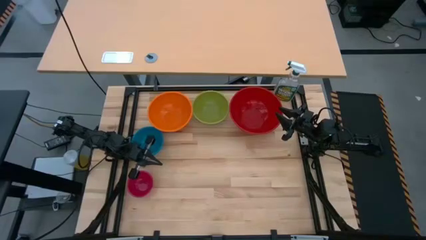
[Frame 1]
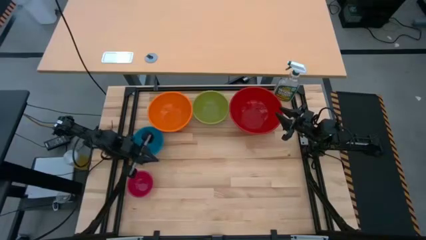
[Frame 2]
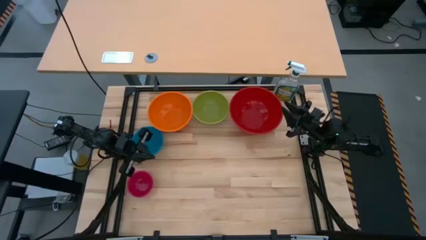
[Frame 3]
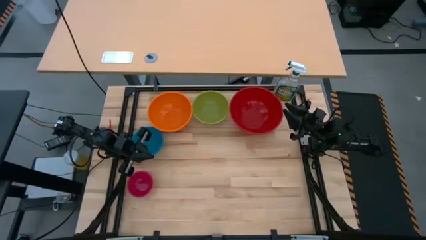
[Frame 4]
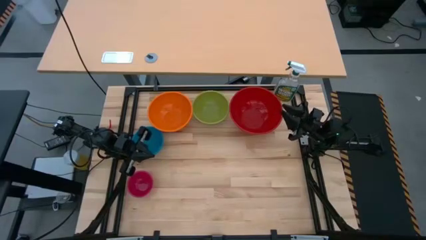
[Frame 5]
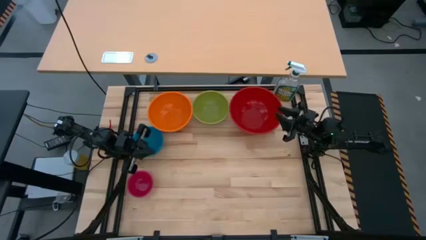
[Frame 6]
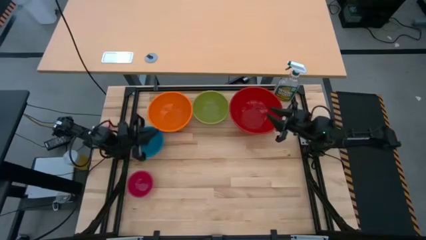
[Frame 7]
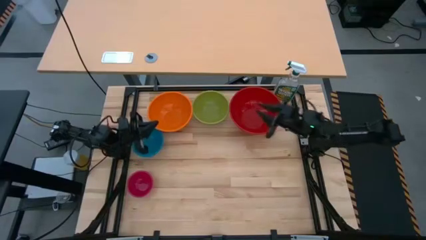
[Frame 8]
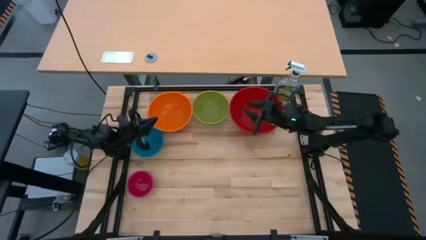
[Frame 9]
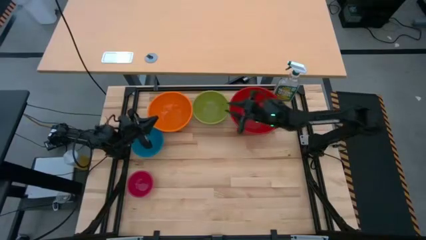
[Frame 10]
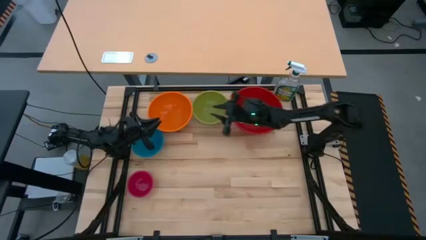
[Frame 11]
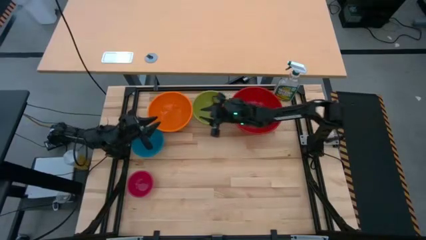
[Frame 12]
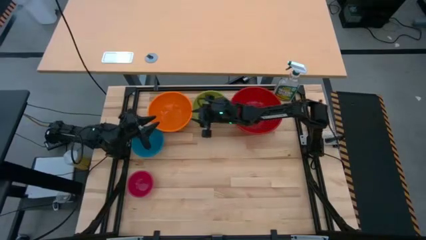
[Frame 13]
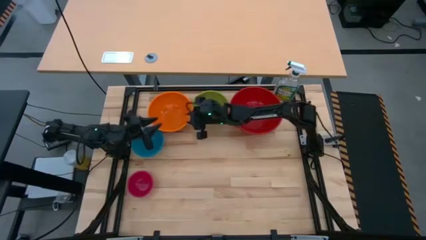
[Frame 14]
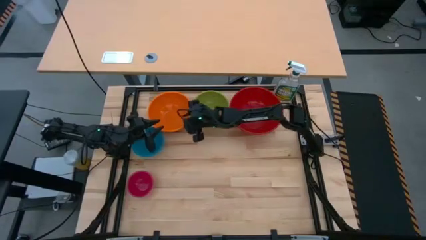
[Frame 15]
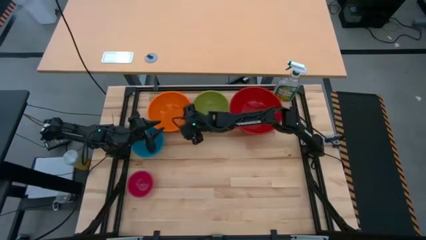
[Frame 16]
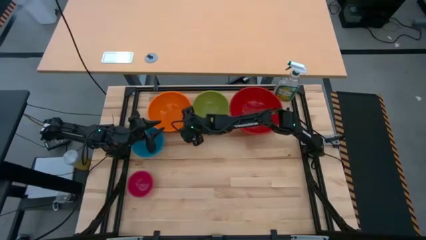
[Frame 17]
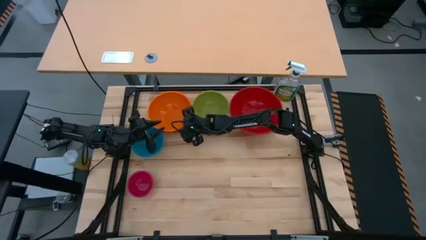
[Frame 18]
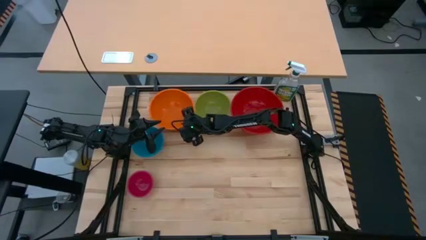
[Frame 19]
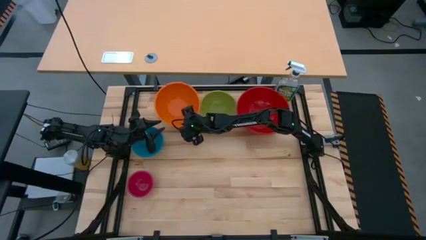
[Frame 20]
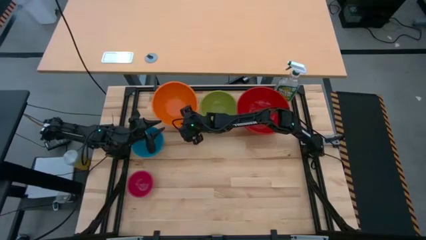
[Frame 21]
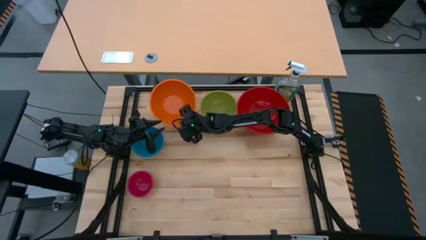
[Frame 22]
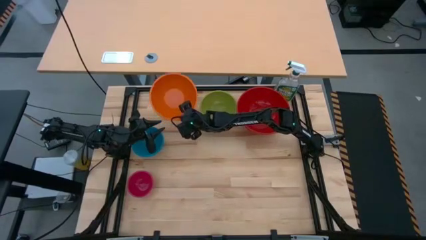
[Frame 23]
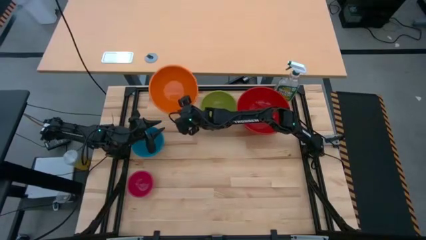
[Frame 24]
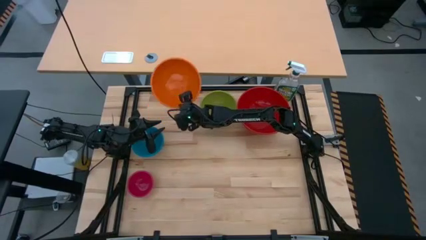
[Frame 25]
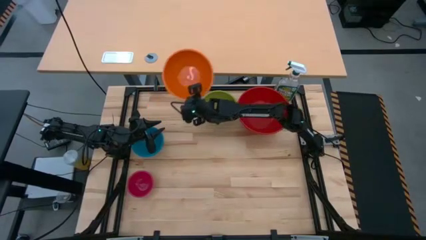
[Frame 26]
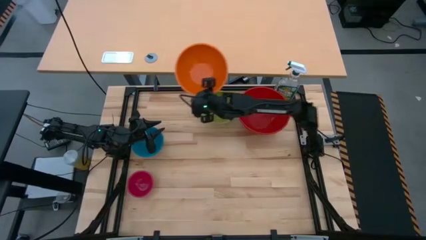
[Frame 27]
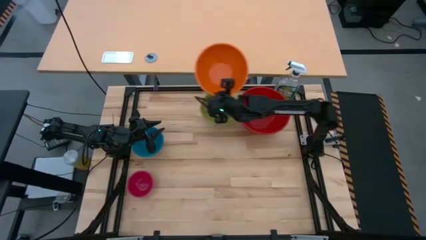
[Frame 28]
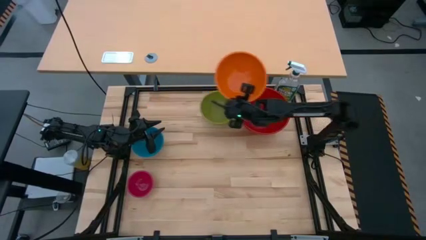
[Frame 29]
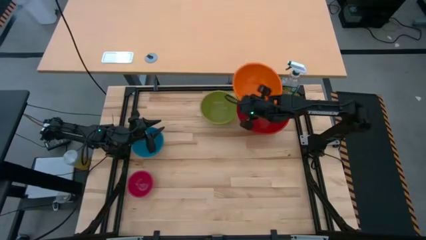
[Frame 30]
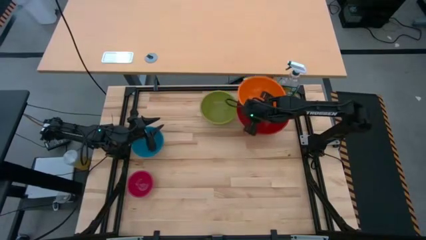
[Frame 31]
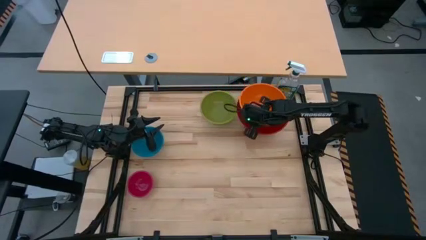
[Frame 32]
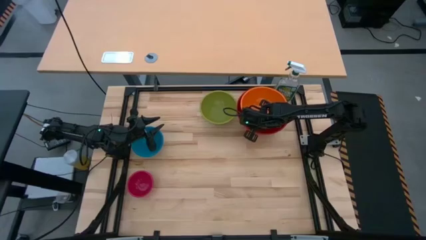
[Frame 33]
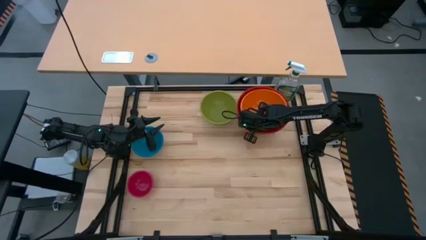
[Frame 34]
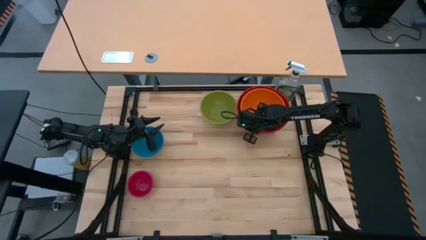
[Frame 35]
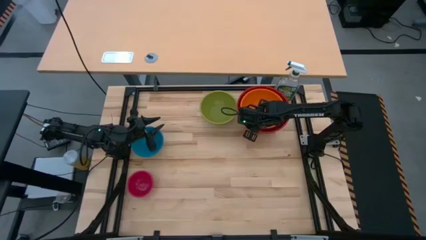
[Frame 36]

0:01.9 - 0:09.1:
Stack the orange bowl into the red bowl

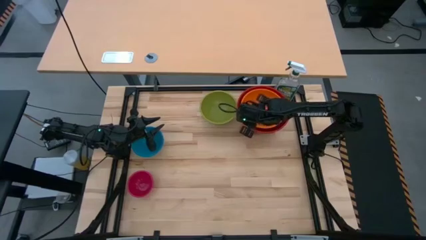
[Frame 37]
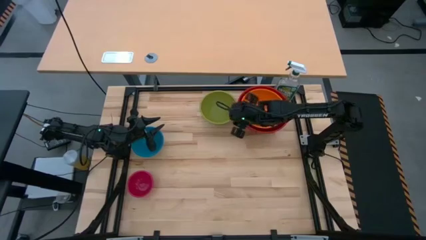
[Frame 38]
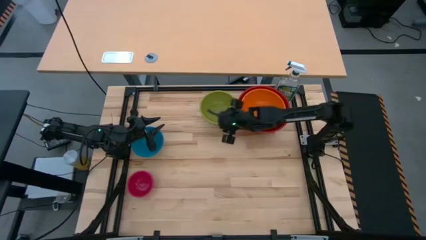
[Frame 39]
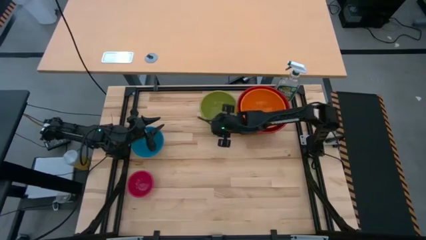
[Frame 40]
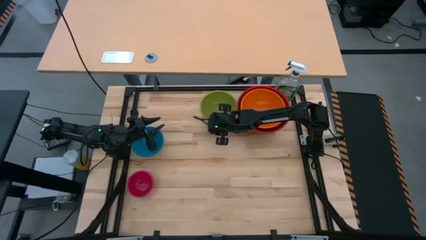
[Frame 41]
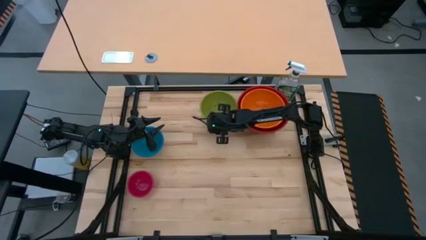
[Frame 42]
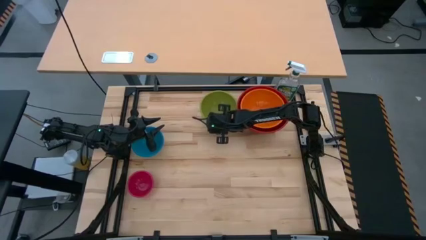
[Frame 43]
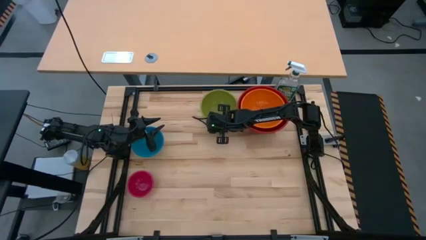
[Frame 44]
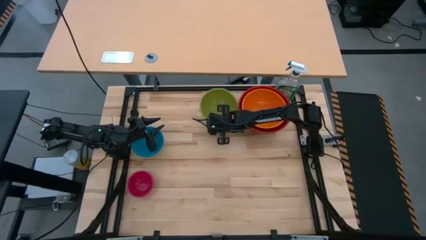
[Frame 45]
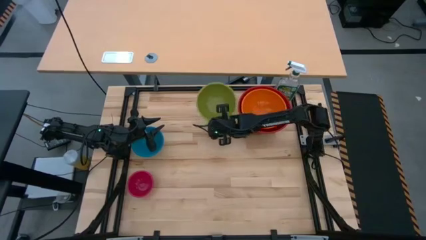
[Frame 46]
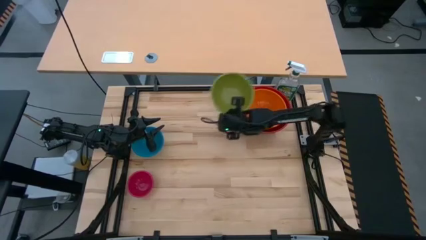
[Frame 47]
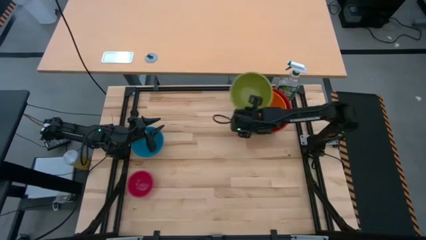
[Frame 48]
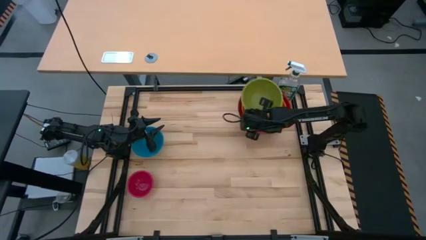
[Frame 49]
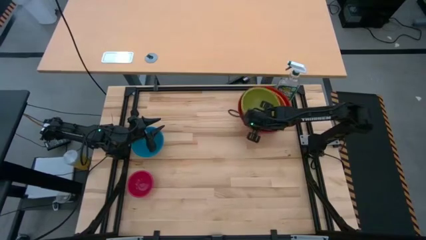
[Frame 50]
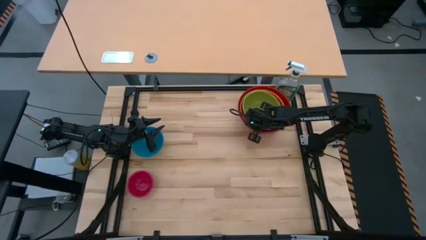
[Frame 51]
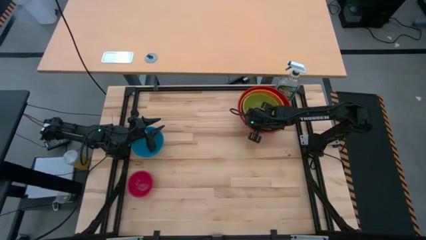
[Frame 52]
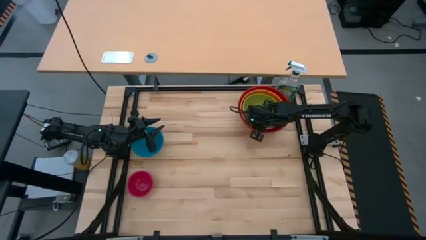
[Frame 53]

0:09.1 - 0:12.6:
Stack the green bowl into the orange bowl

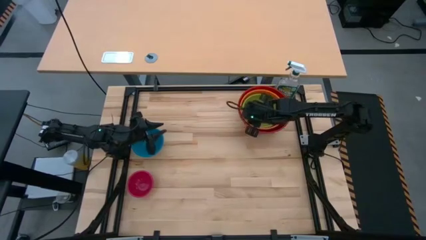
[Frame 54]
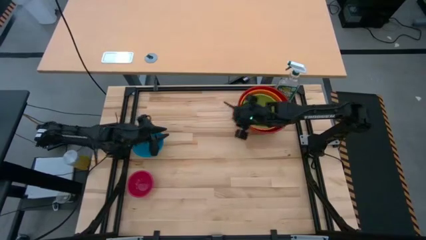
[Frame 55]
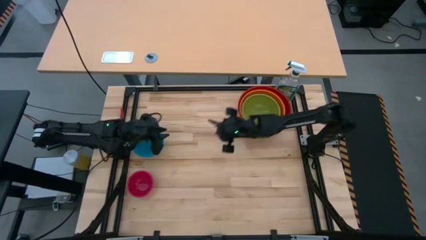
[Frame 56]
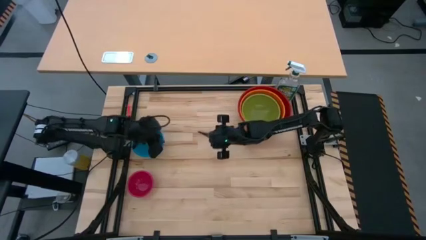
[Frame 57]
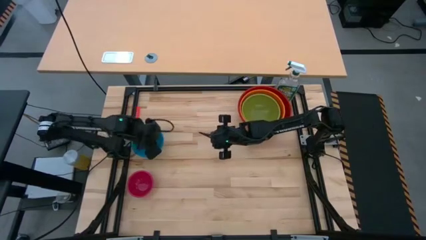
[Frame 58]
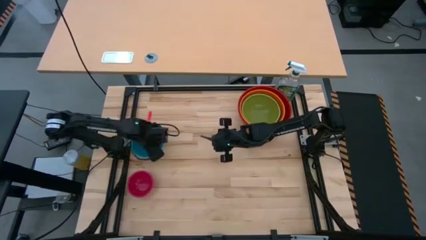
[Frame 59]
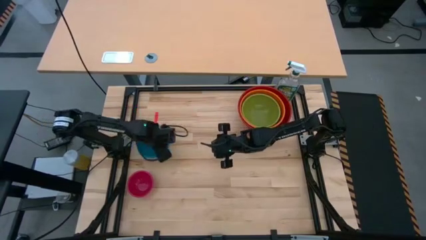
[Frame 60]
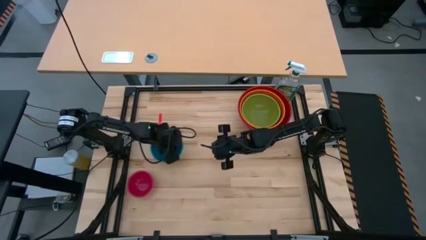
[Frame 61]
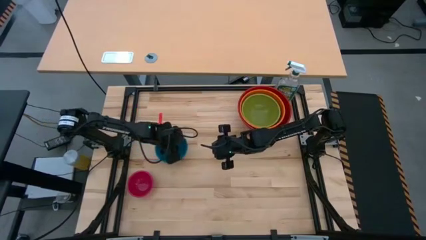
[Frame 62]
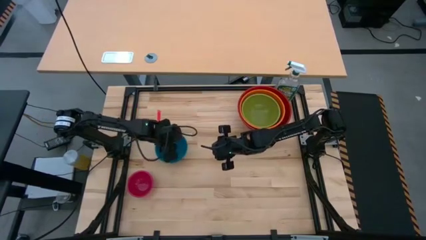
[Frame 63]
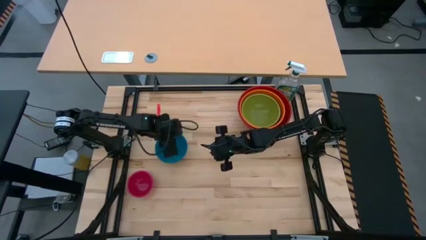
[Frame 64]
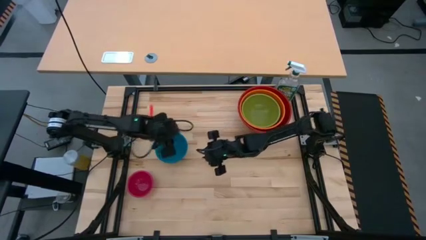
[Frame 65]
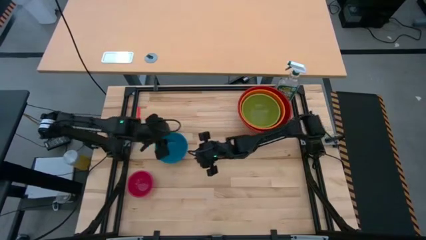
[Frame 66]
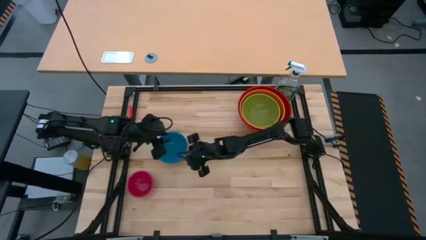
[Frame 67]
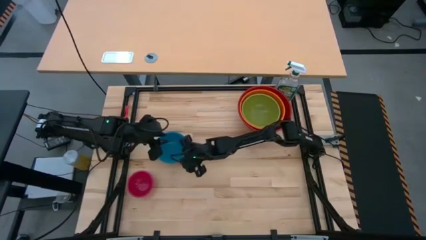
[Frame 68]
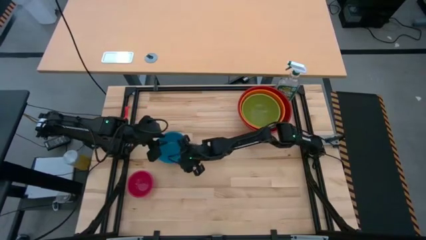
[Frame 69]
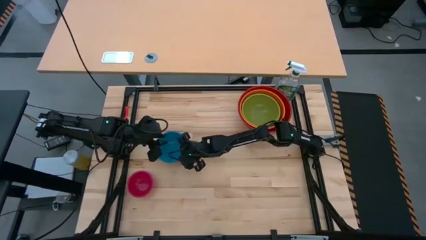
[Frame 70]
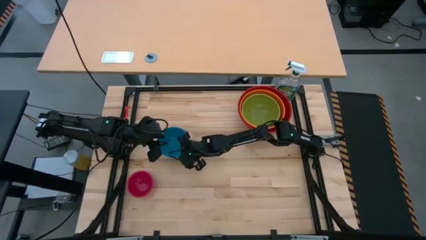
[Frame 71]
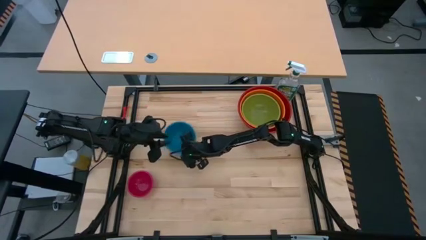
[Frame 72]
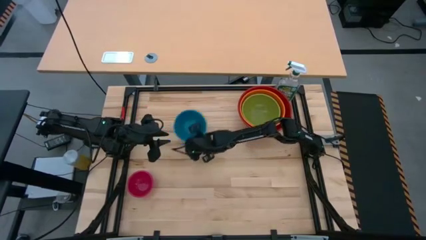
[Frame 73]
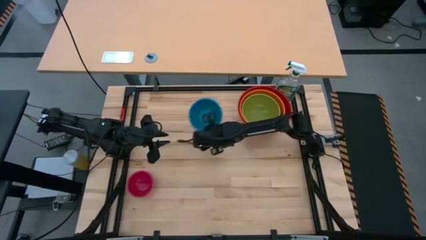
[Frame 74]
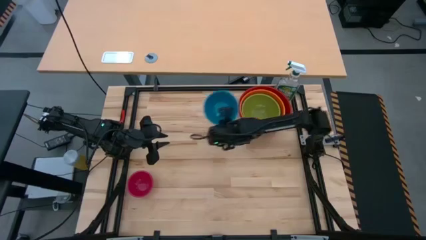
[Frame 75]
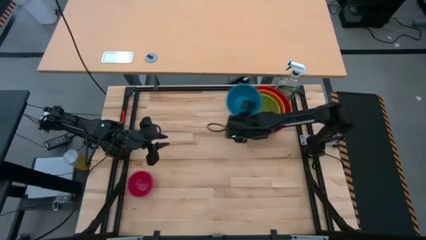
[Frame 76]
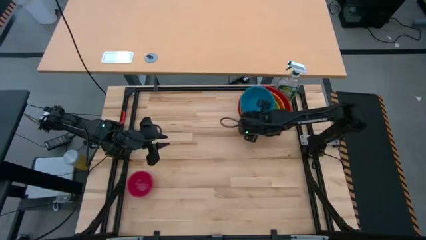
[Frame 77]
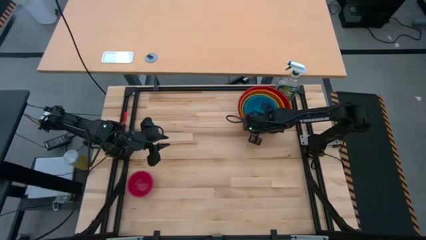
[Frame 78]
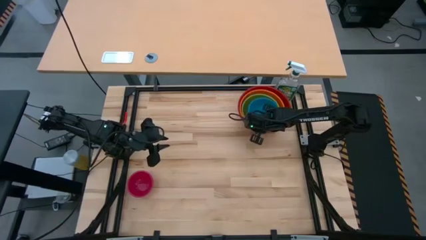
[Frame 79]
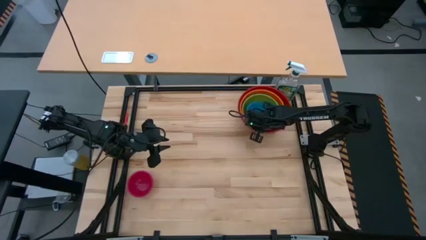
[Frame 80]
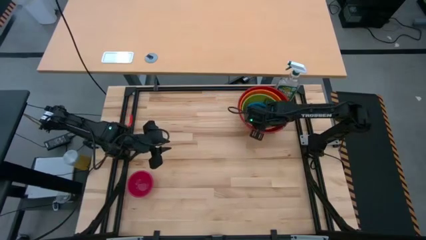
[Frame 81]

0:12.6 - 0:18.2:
Stack the blue bowl into the green bowl
